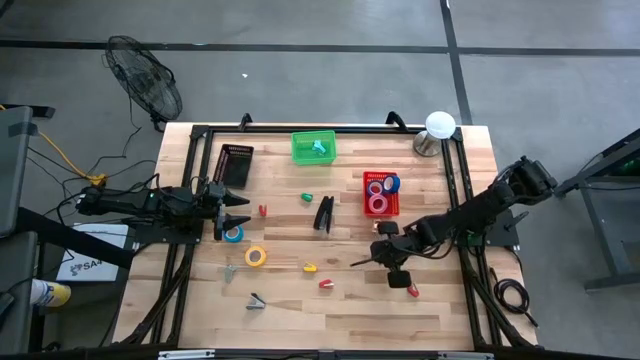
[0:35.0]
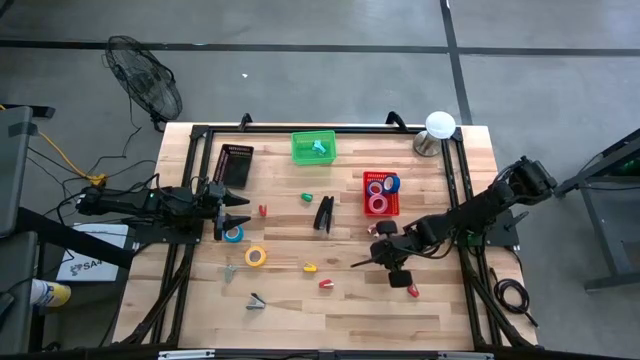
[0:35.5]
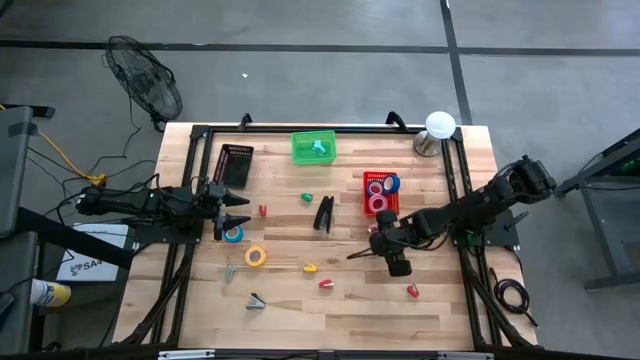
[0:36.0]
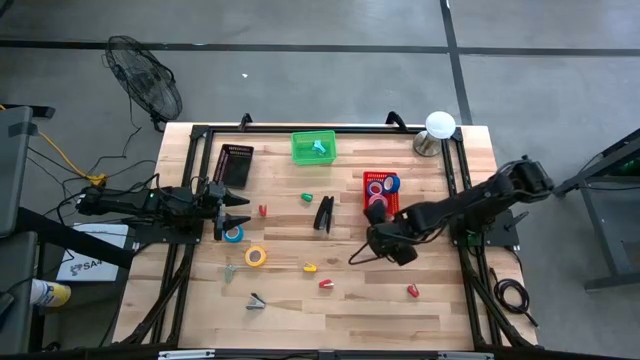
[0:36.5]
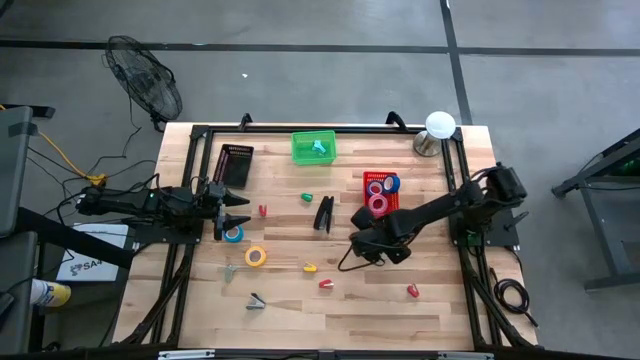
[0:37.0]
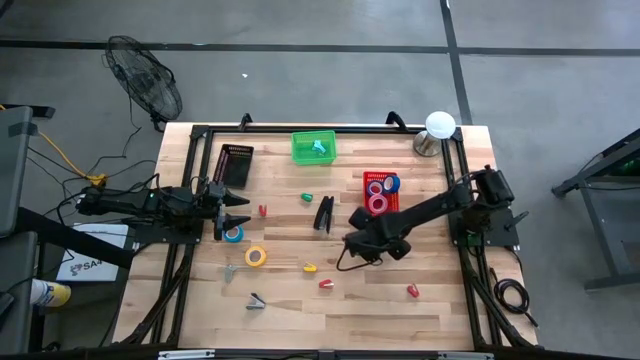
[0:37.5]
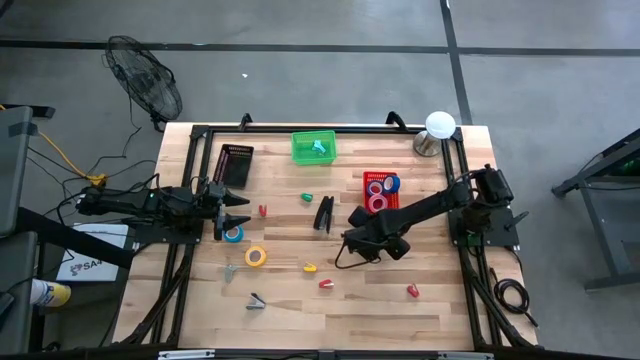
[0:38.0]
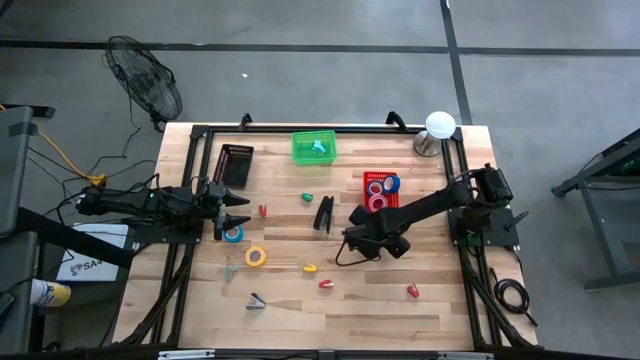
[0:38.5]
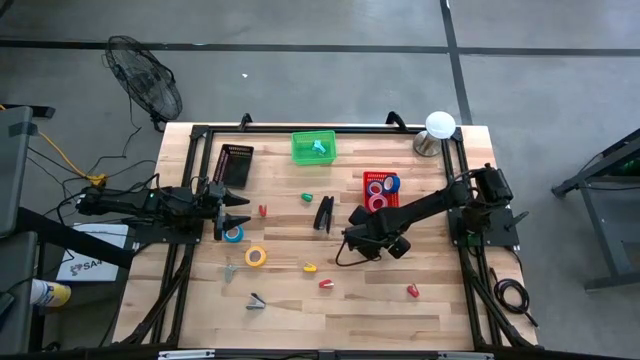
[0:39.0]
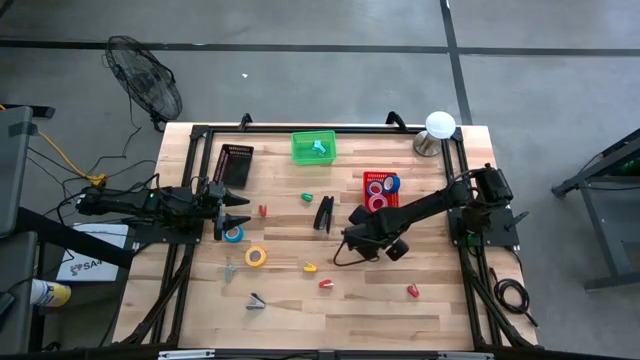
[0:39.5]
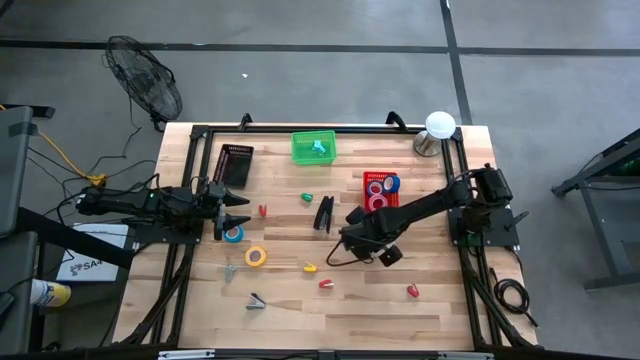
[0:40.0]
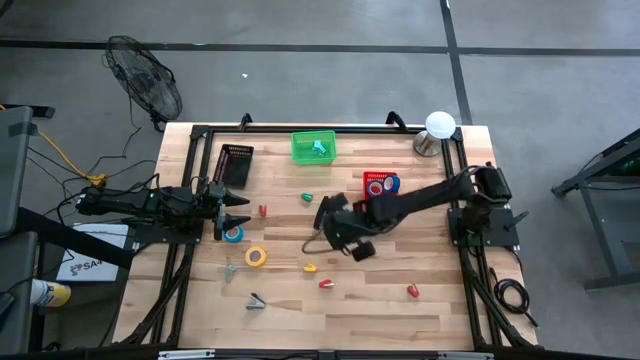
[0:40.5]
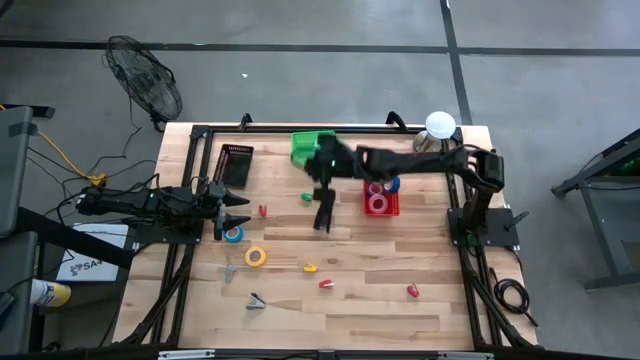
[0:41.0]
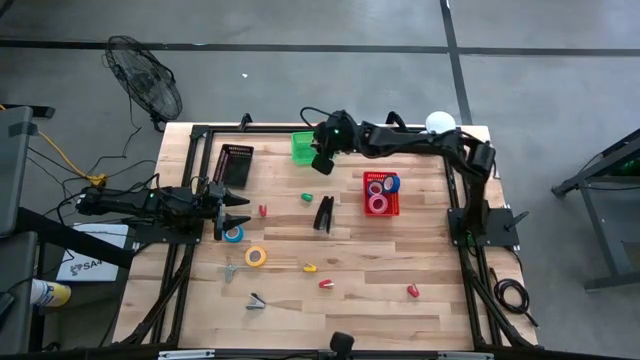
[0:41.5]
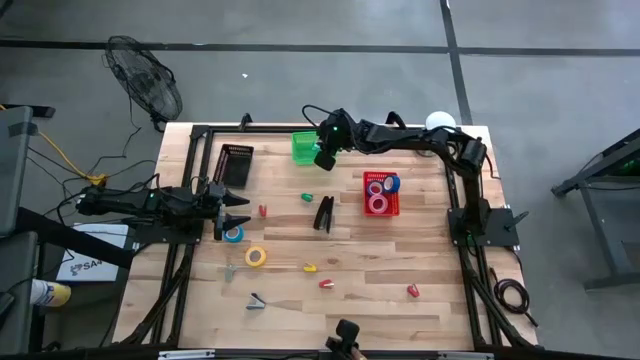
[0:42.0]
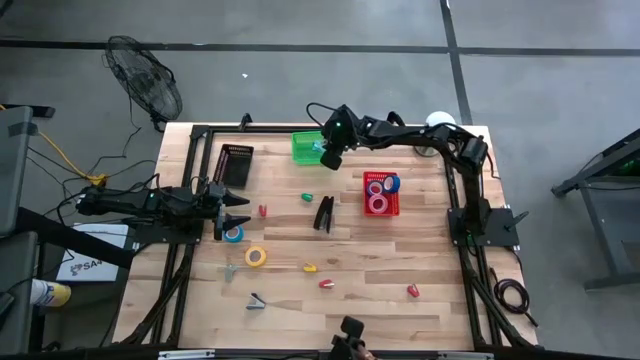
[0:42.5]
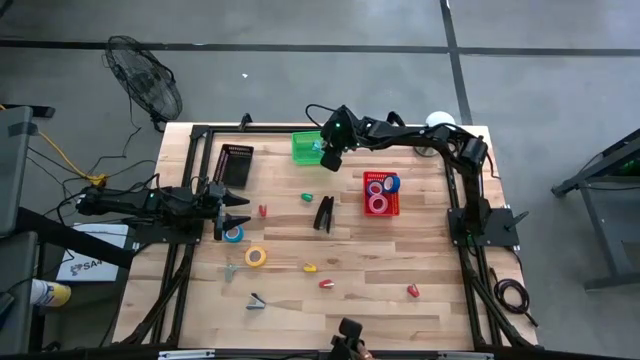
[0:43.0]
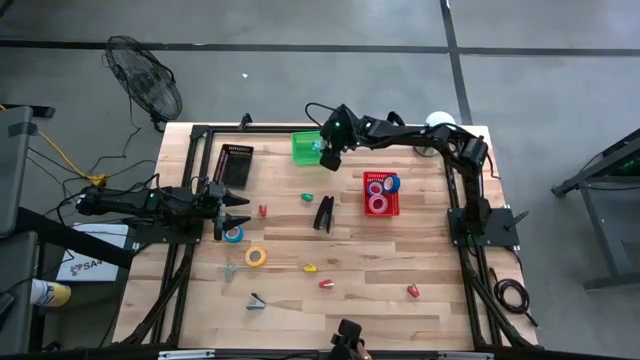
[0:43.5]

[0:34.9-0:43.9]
Task: Pick and place Stapler, Stapler remover, tape
Put the pink staple remover into the green bin

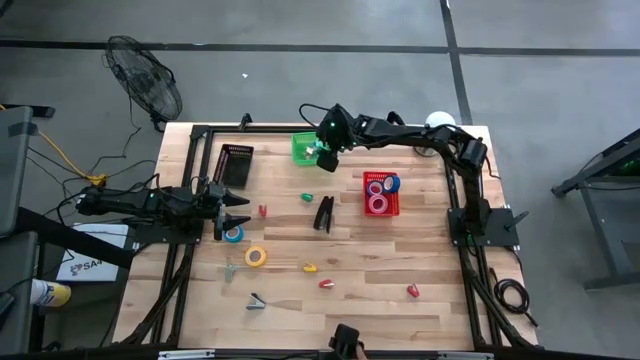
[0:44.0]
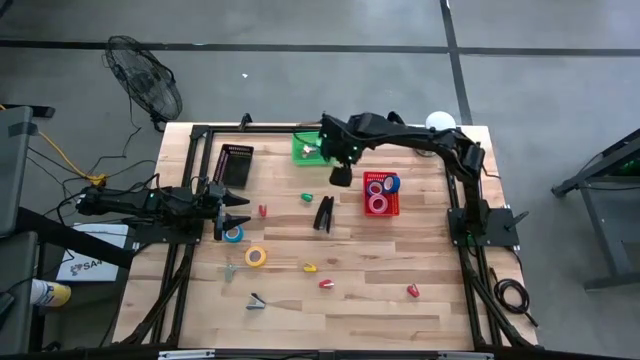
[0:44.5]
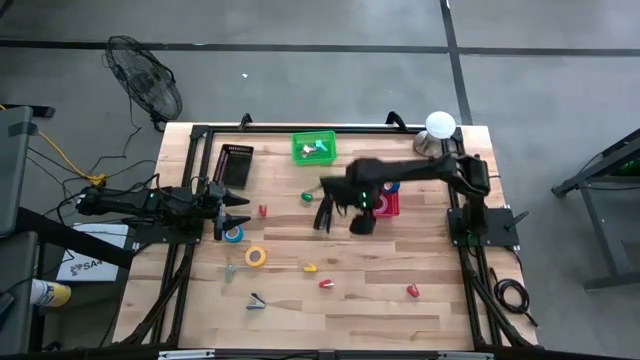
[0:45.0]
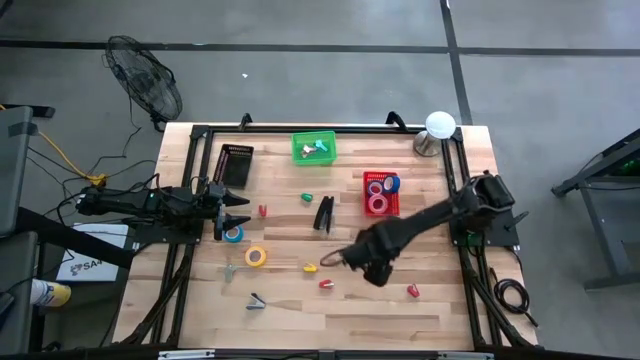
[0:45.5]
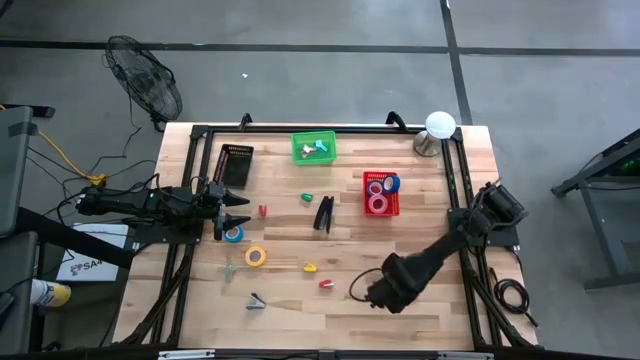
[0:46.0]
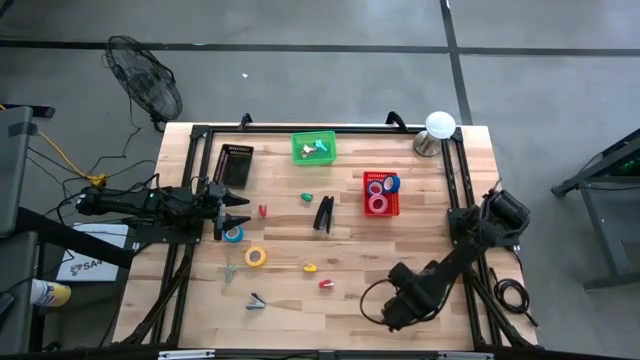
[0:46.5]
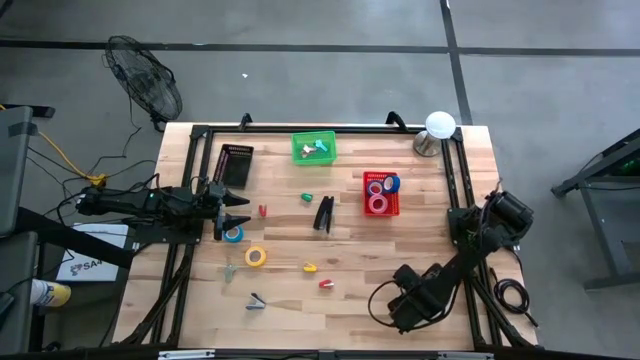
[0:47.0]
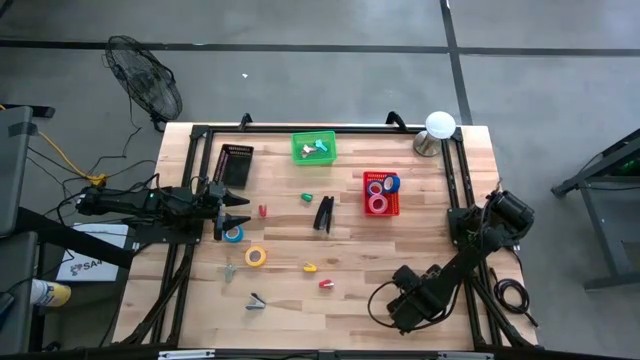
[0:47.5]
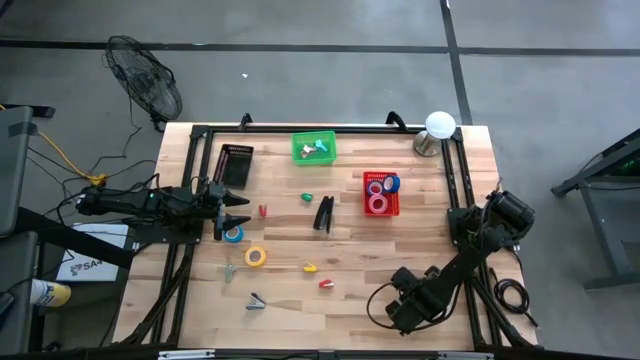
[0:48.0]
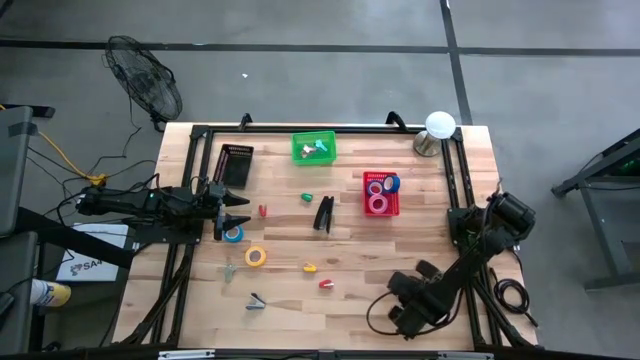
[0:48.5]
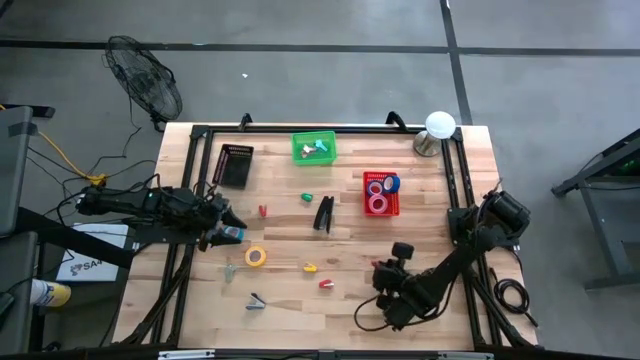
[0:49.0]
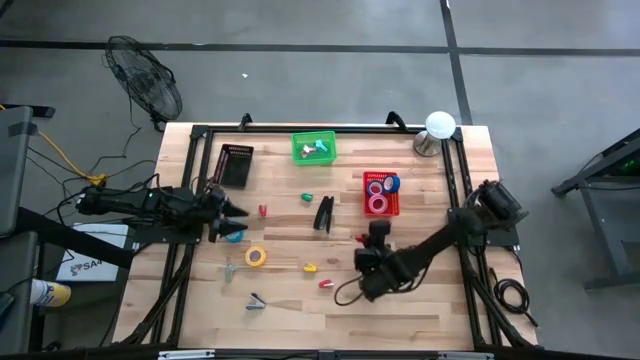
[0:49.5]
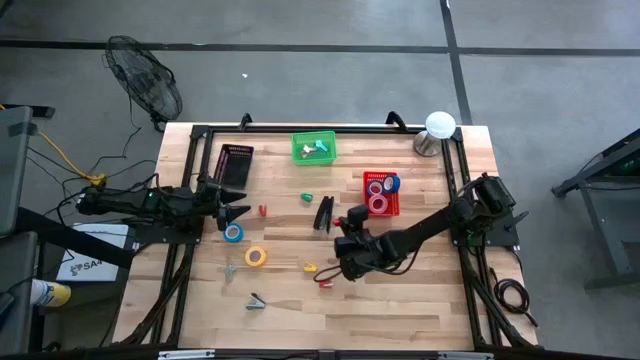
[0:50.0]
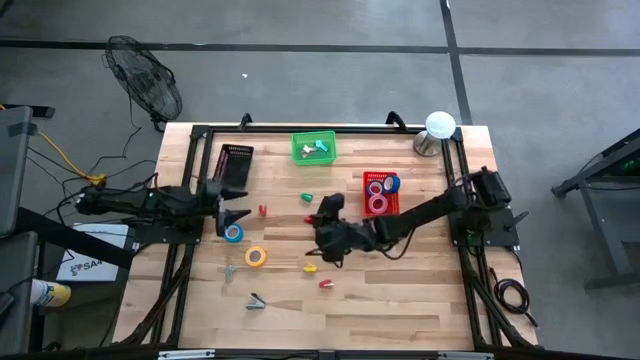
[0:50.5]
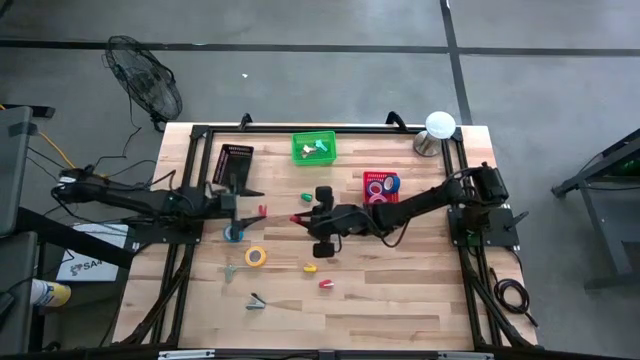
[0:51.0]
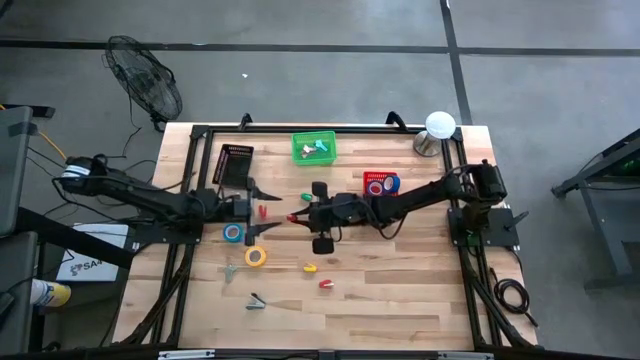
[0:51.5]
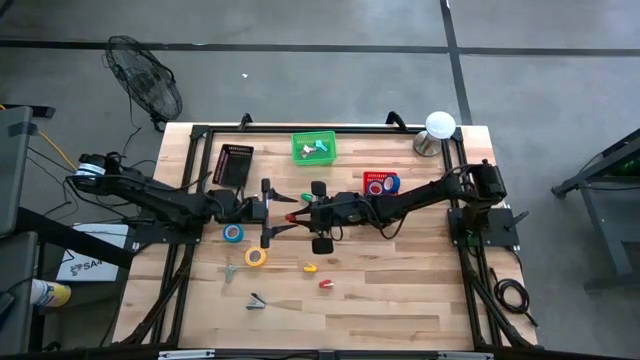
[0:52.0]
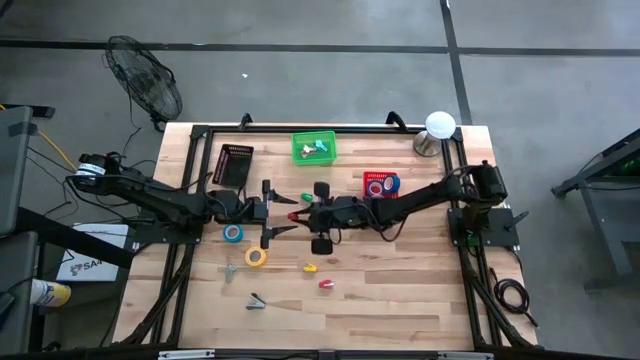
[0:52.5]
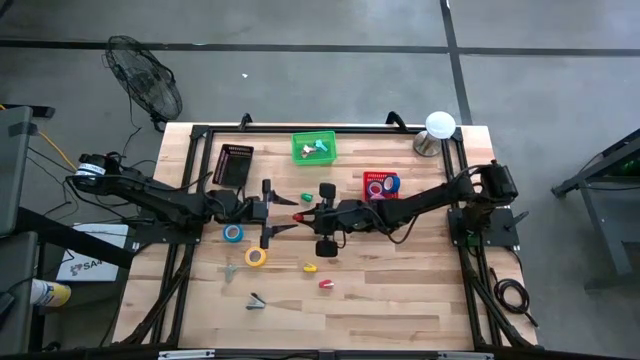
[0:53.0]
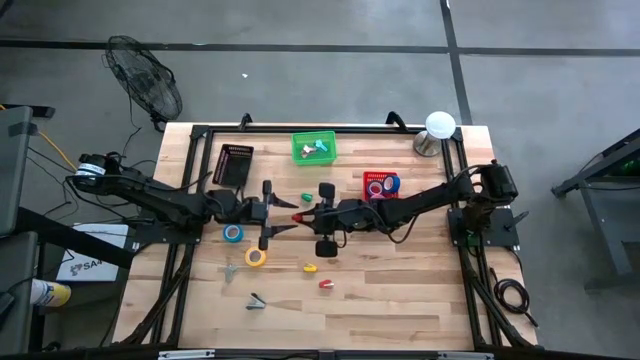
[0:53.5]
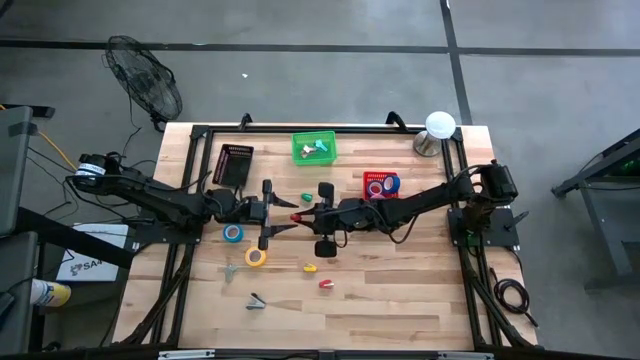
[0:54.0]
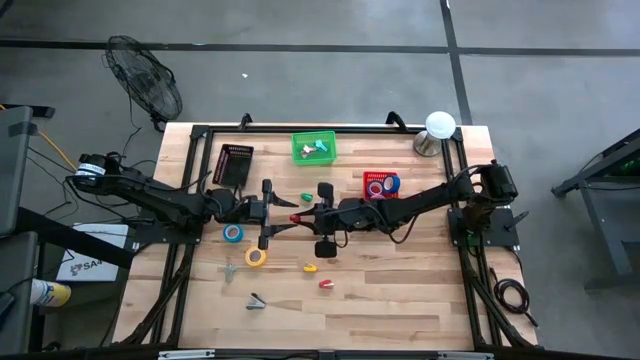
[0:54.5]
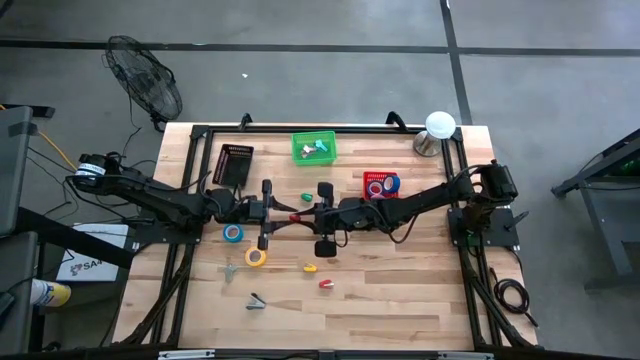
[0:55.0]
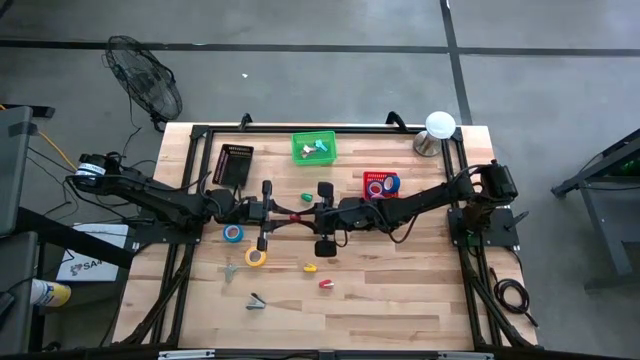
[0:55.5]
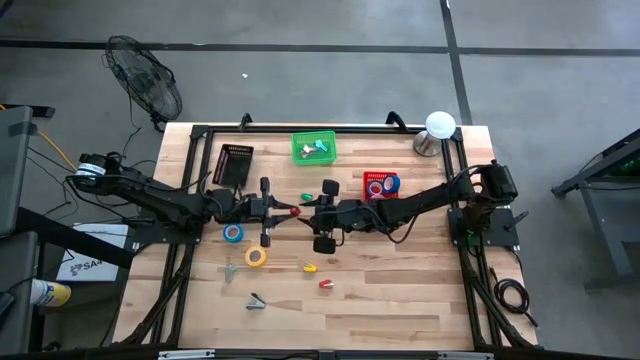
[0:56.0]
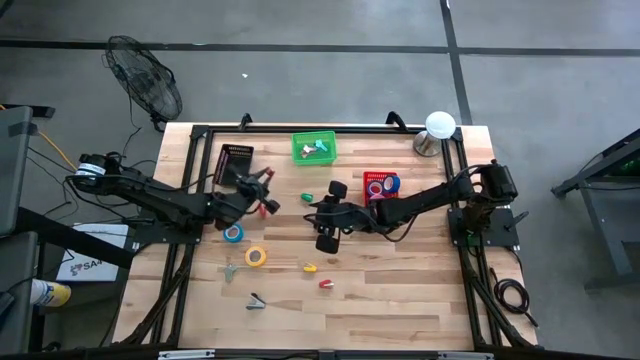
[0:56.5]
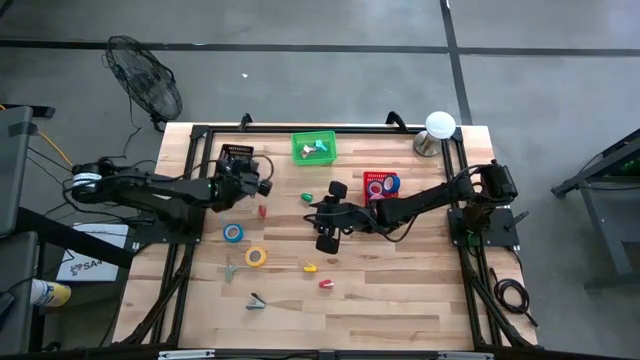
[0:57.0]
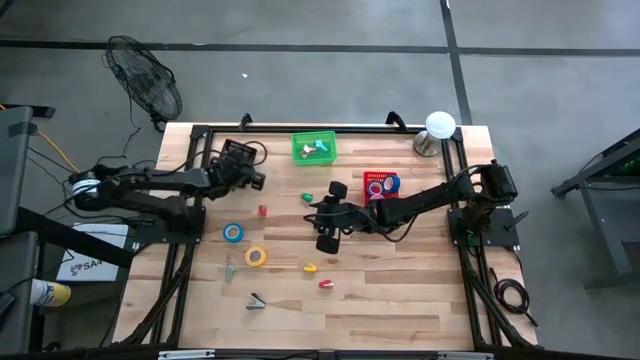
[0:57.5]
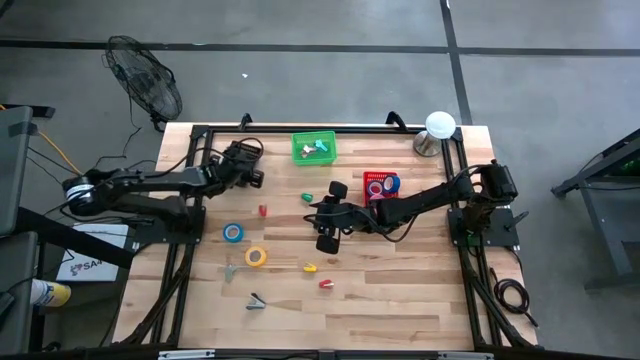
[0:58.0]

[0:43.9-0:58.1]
Put the bottom right red stapler into the black bin
